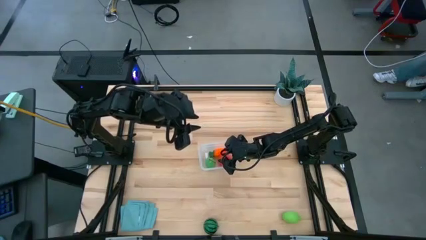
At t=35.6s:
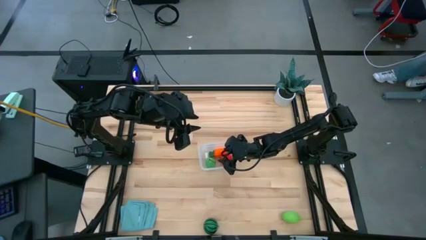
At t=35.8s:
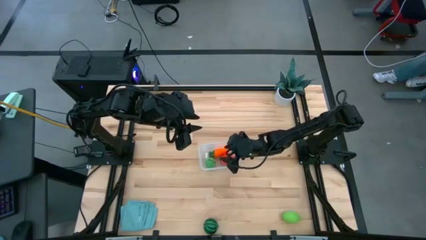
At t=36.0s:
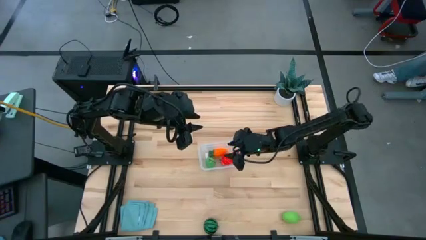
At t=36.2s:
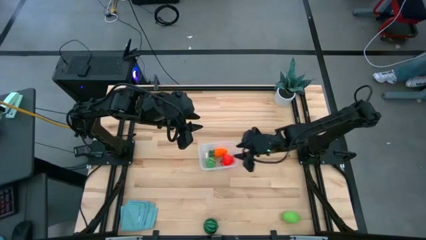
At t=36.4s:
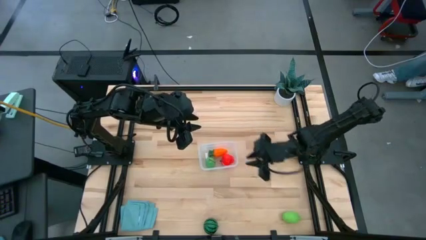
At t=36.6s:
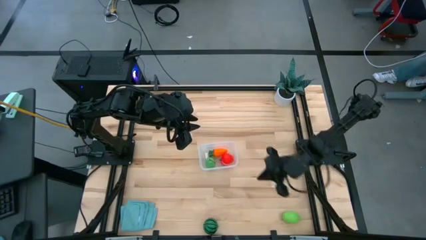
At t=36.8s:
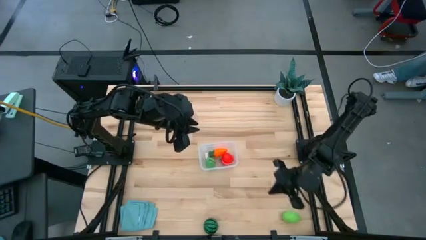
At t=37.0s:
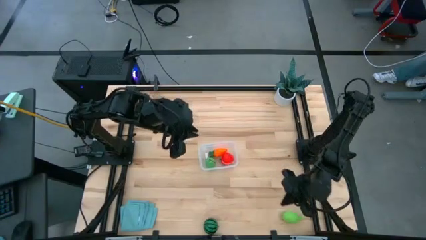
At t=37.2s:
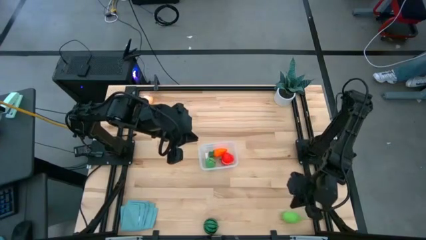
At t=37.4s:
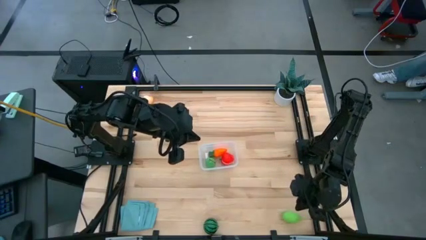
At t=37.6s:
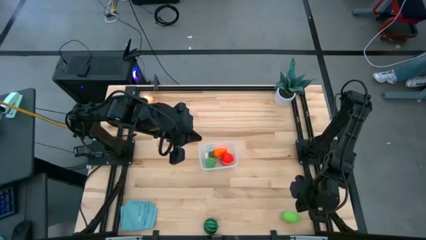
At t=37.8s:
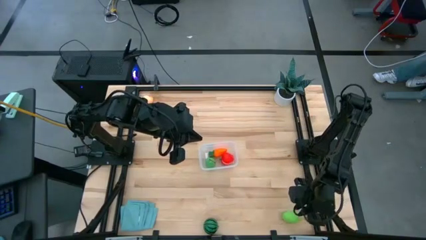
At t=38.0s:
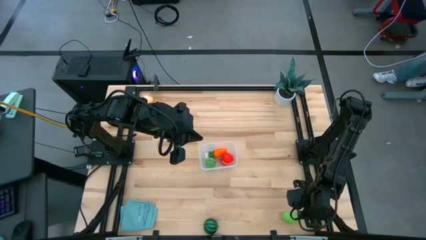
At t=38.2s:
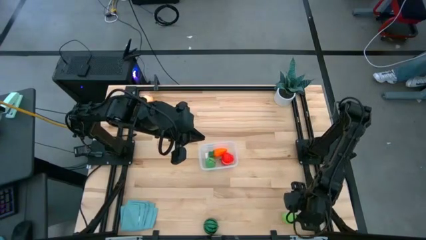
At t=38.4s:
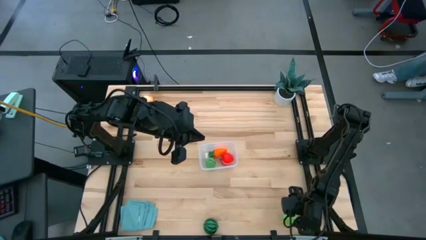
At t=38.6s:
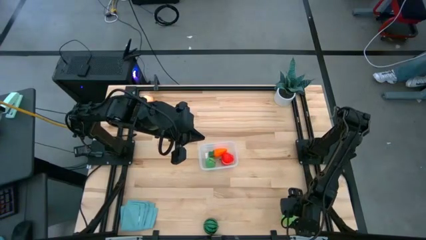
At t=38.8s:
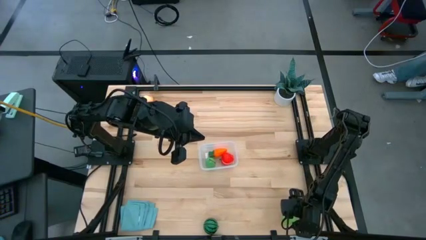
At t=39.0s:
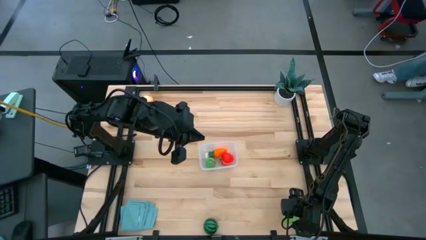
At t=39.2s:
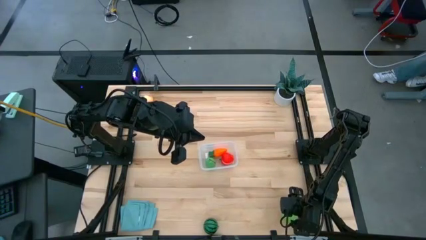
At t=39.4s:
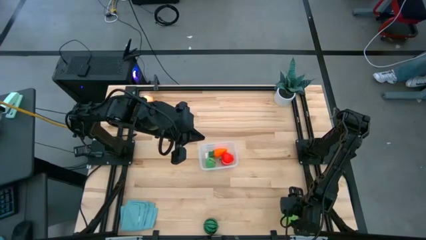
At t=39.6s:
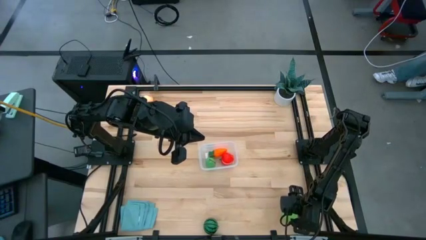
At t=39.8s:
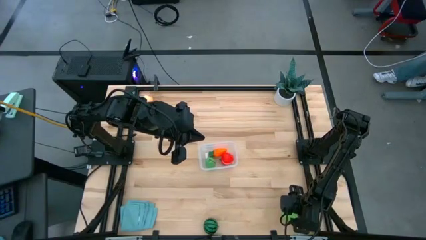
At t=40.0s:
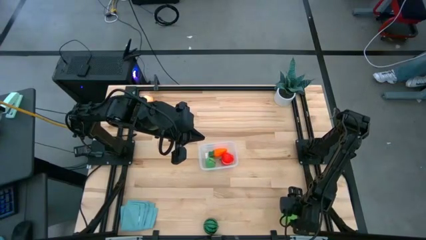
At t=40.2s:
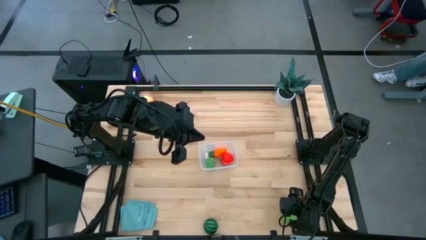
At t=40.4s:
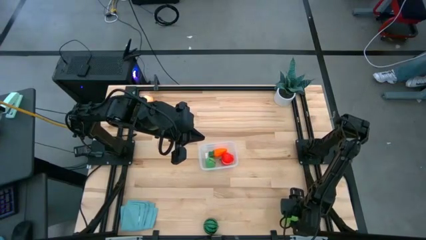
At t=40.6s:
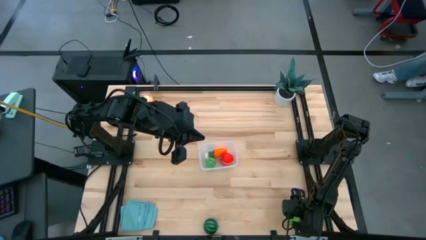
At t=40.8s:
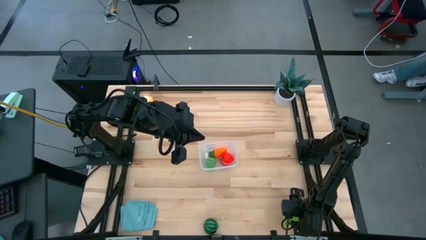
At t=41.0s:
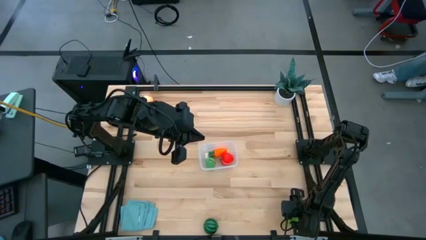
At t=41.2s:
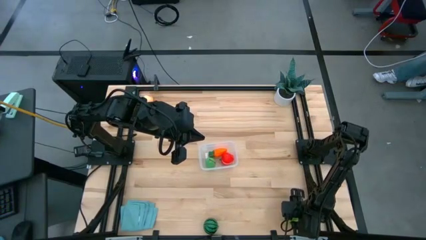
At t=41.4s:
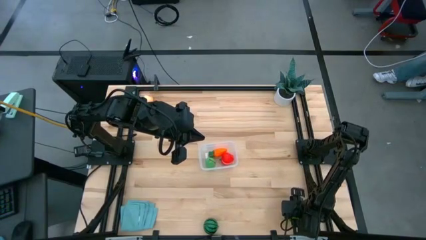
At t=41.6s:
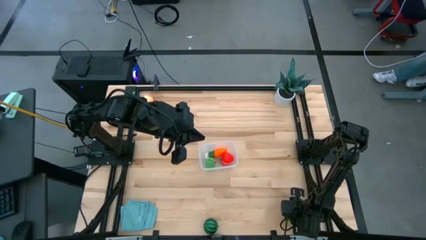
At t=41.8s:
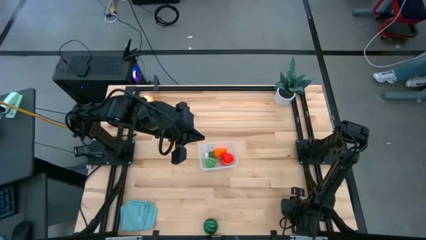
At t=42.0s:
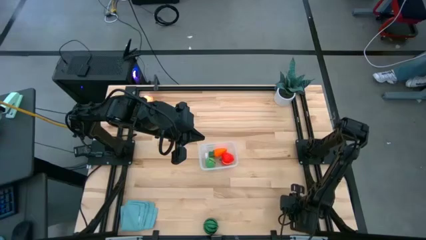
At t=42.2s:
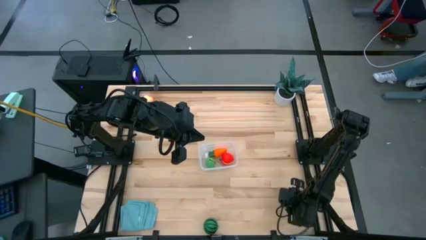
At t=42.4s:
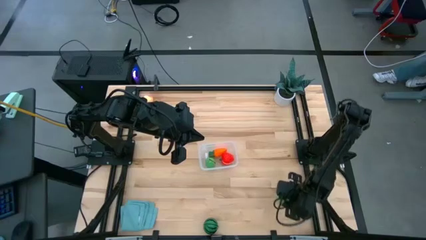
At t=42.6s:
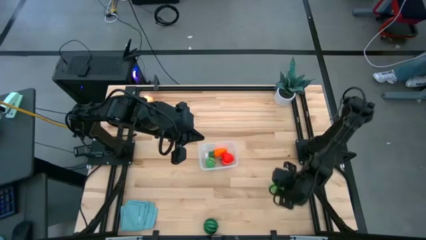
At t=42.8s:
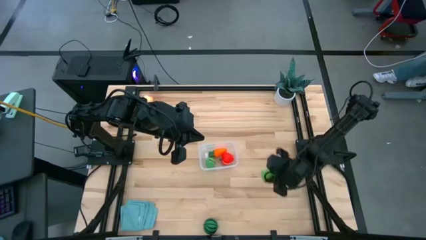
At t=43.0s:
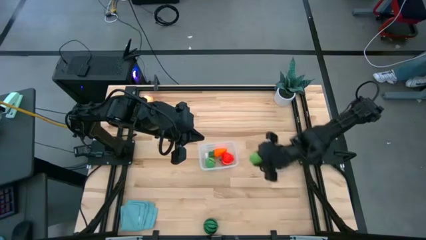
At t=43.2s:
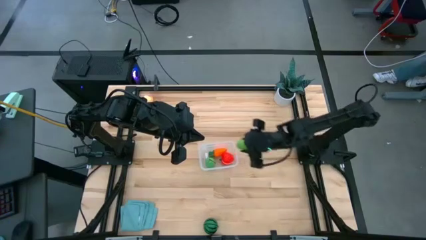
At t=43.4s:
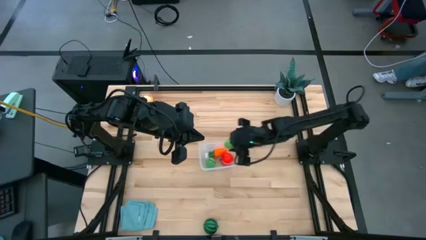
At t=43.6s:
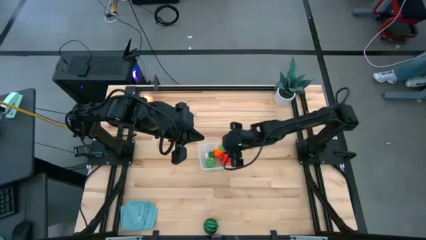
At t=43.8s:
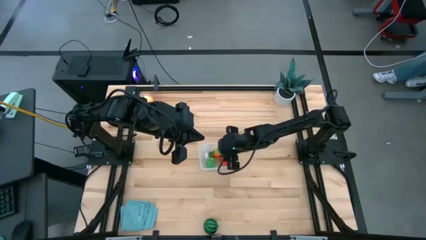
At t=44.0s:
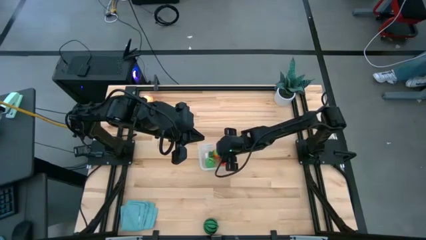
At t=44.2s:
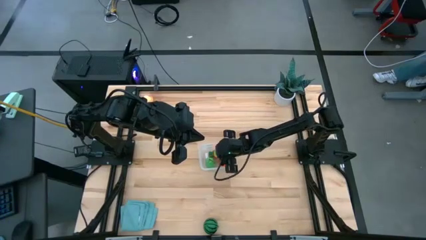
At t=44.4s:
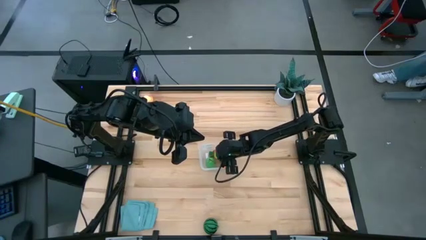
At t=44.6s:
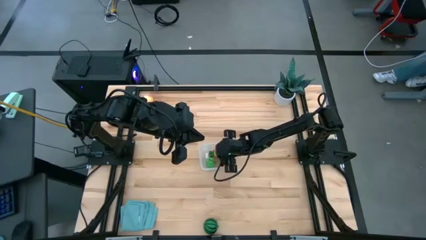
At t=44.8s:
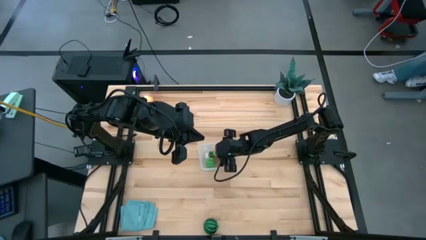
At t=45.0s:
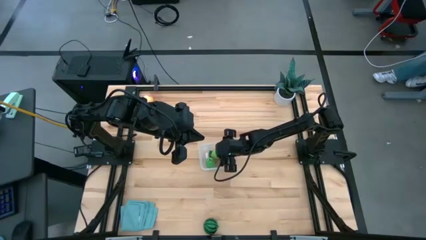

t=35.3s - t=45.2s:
Task: Pick and placing Produce into tupperware
Put the green melon into the transparent bin

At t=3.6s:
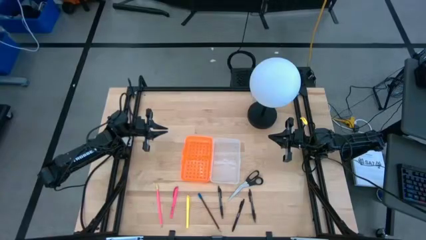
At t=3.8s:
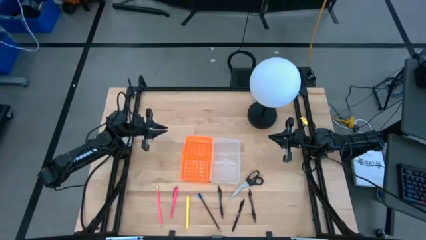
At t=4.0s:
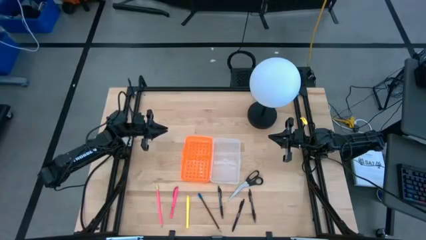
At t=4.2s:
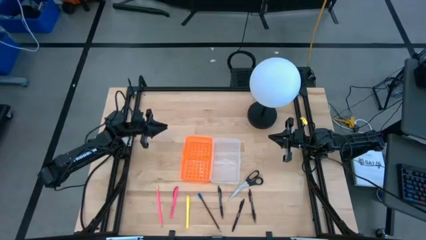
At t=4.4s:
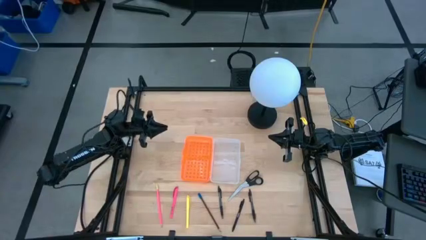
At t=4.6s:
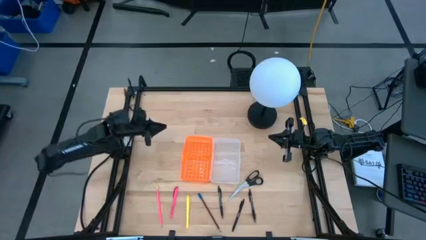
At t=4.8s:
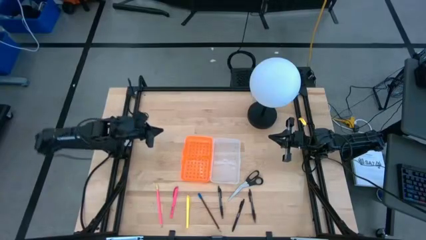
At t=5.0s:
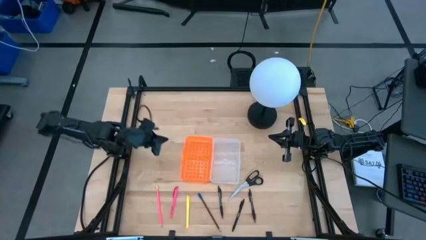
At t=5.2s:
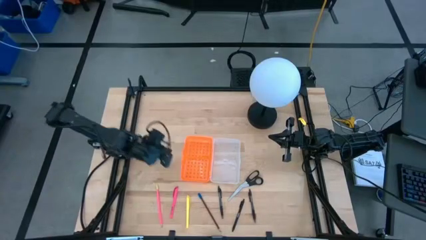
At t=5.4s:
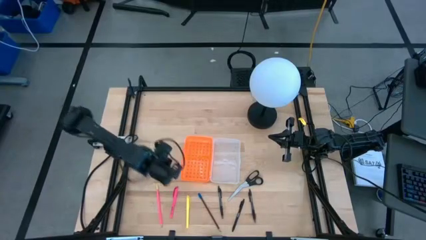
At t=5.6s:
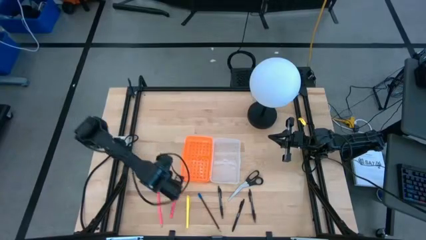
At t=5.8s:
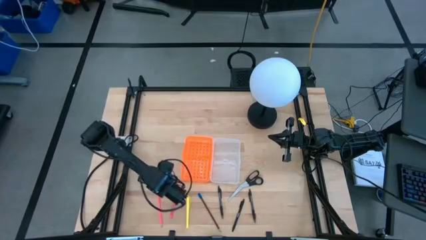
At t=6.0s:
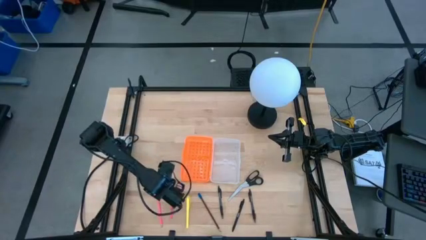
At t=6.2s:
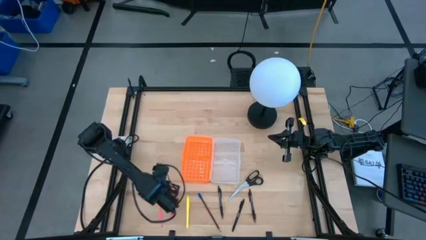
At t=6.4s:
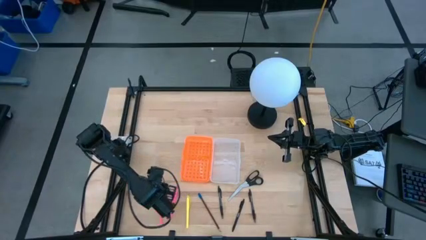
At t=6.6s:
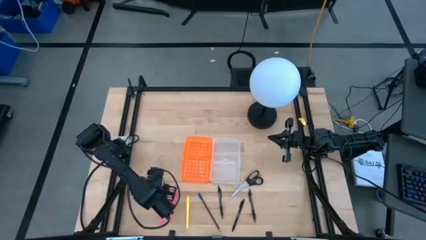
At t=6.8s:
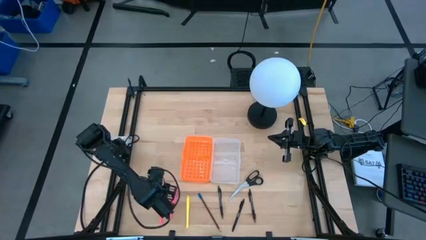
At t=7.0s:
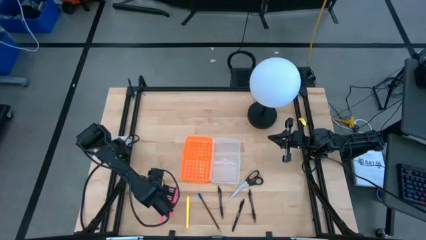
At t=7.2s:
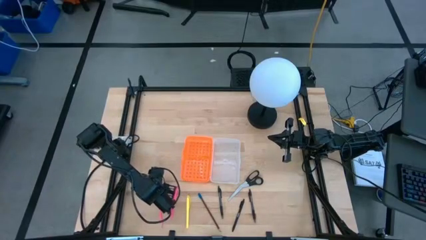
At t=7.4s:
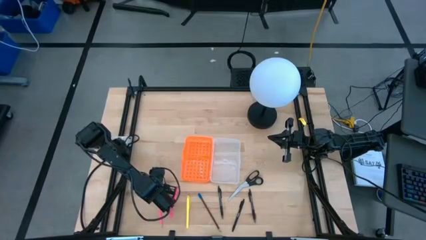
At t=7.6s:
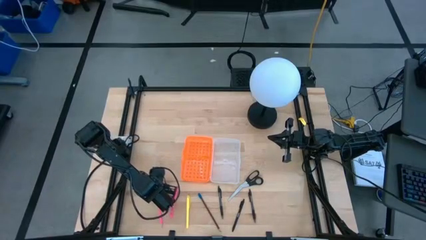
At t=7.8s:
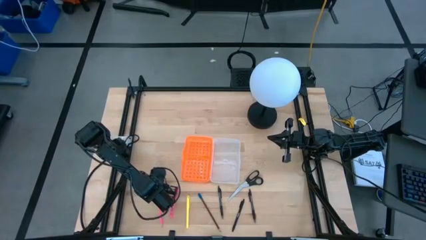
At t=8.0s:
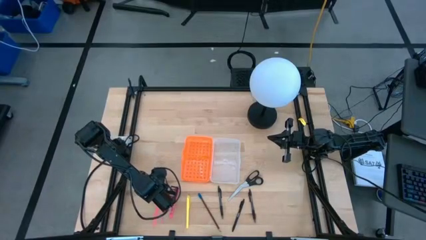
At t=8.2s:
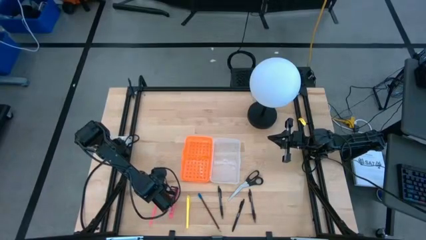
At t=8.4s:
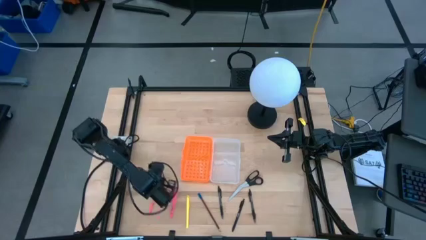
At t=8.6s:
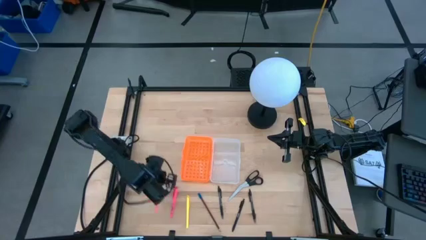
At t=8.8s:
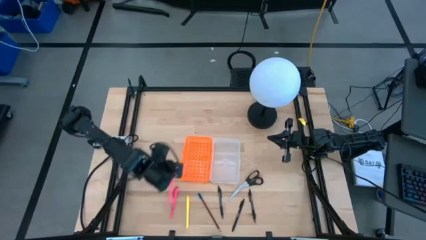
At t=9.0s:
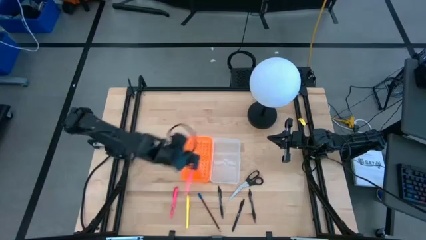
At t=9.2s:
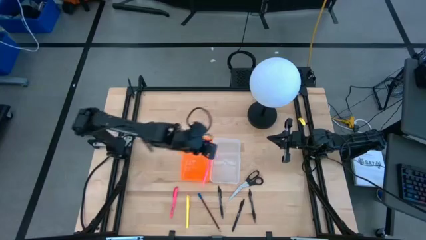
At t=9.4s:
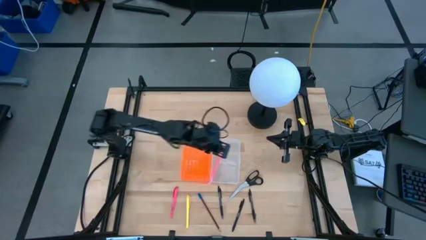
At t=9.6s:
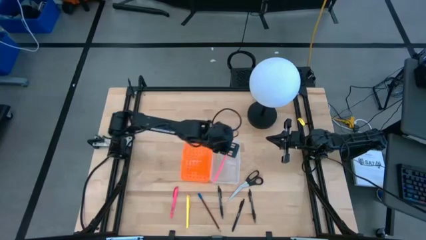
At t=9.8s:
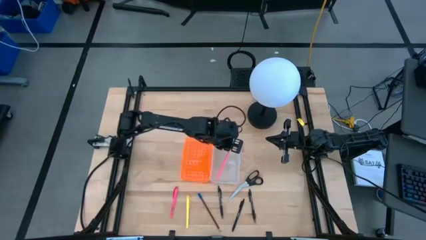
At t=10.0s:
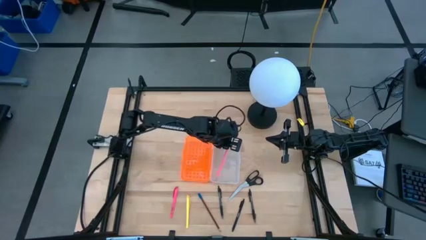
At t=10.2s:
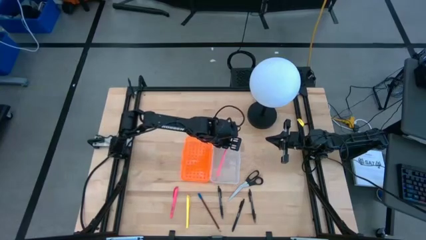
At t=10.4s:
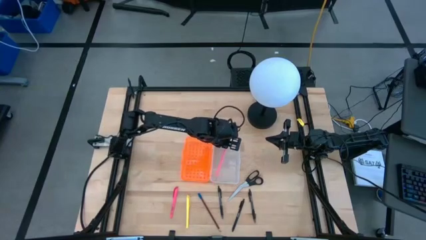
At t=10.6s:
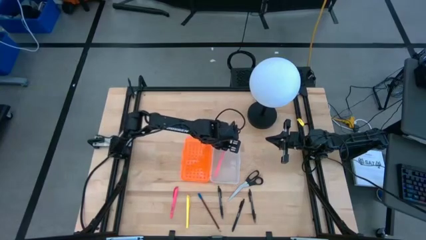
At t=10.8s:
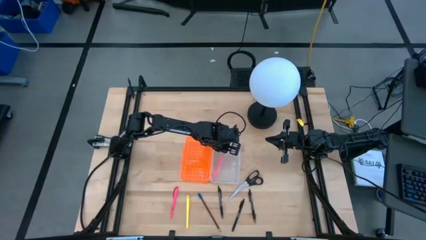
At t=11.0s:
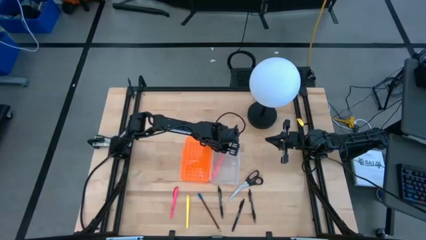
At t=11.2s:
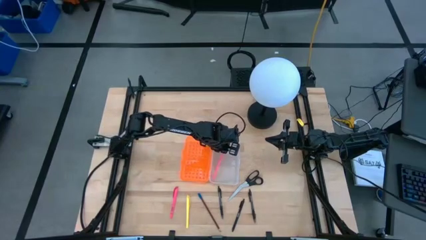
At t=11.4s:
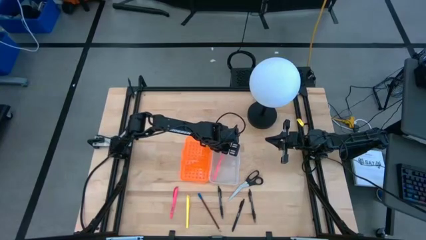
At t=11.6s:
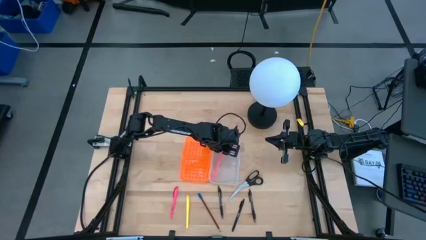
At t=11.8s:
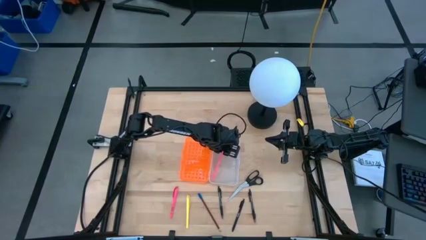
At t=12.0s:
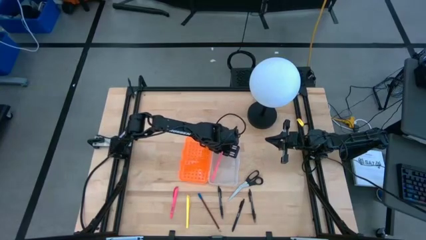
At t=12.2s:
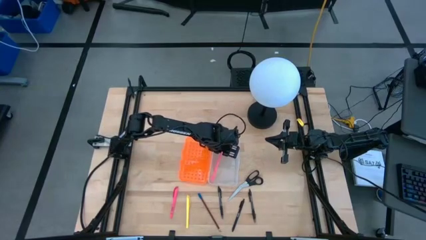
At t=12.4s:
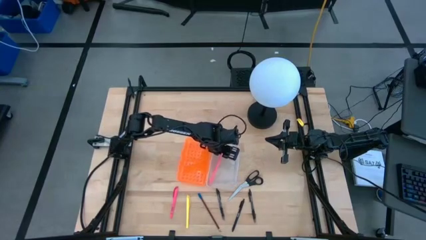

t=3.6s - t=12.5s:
Task: Pick & place school supplies into a supply box
Put the pink pencil into the orange supply box
